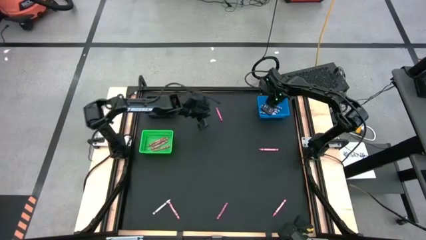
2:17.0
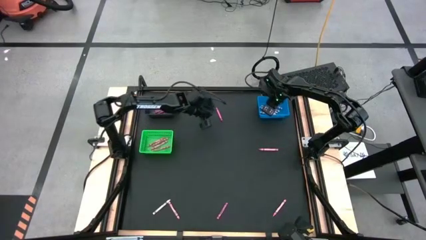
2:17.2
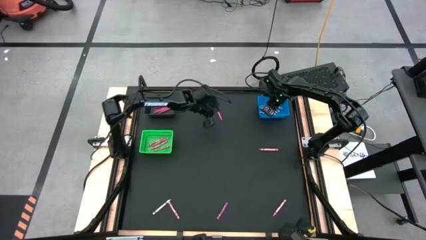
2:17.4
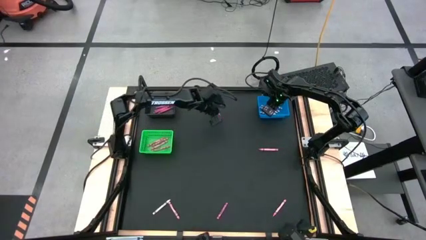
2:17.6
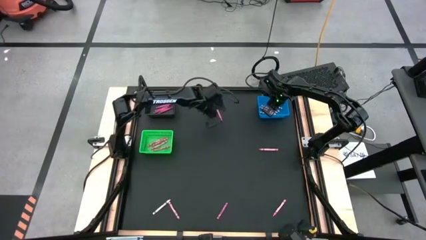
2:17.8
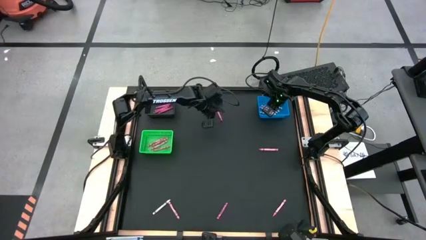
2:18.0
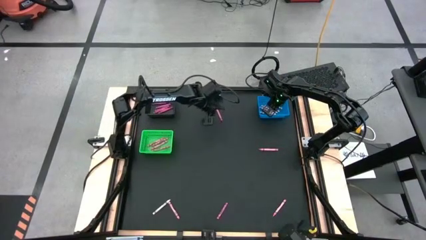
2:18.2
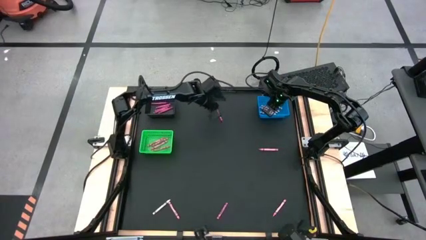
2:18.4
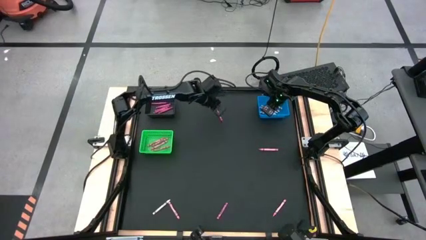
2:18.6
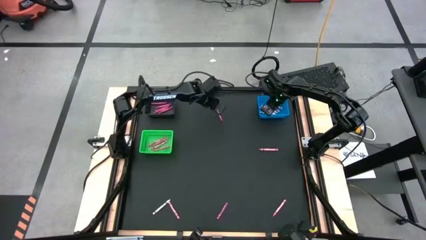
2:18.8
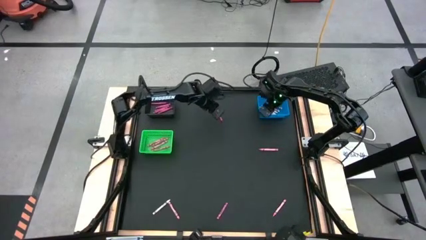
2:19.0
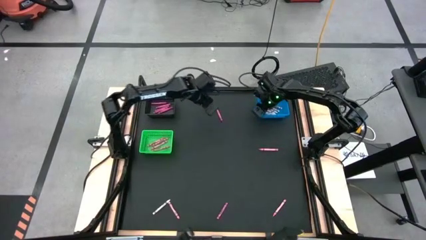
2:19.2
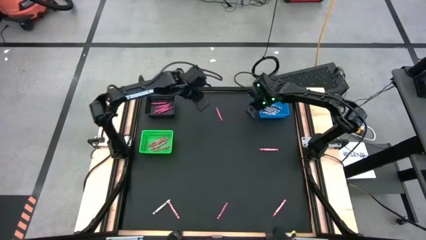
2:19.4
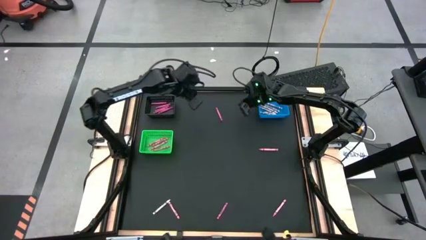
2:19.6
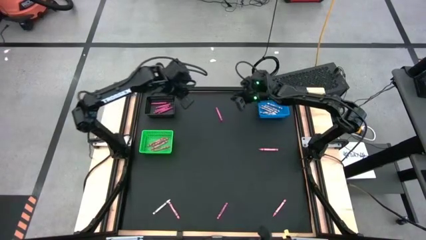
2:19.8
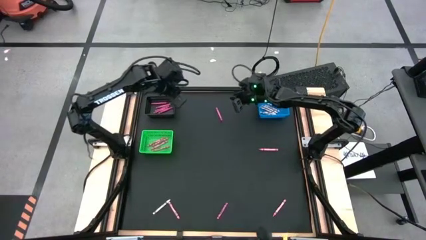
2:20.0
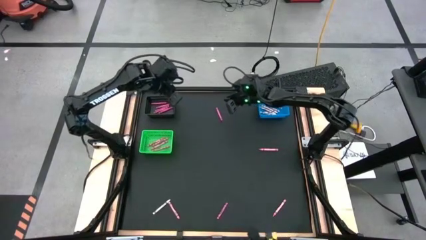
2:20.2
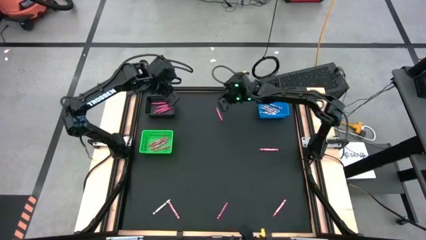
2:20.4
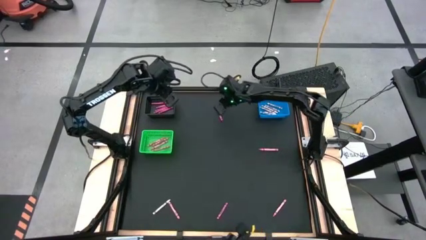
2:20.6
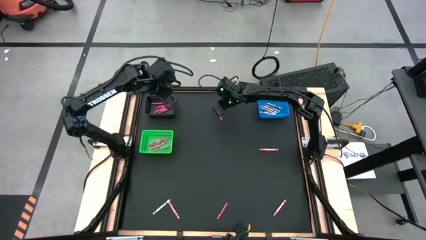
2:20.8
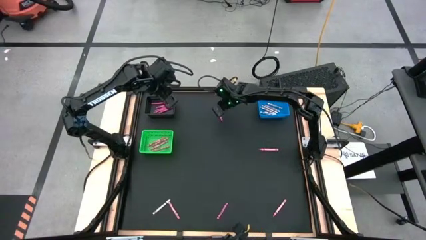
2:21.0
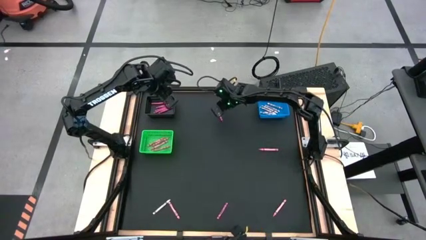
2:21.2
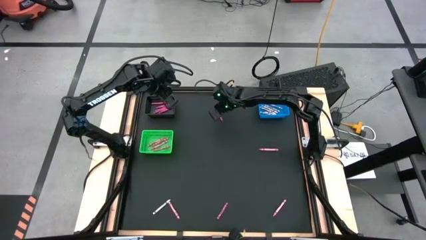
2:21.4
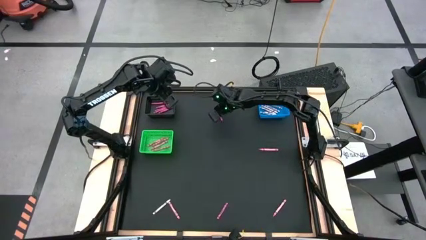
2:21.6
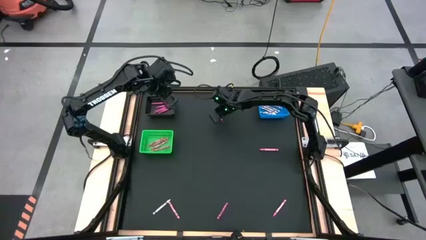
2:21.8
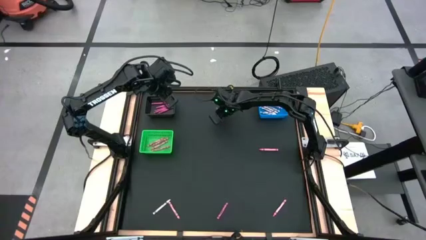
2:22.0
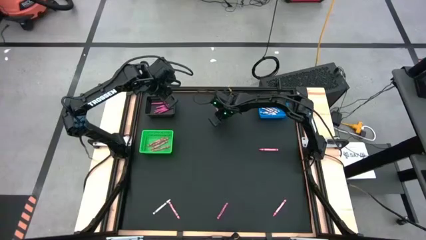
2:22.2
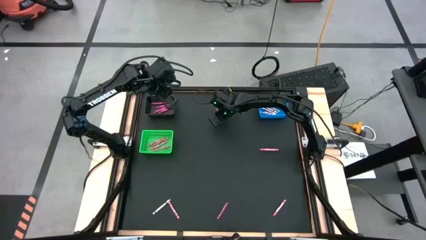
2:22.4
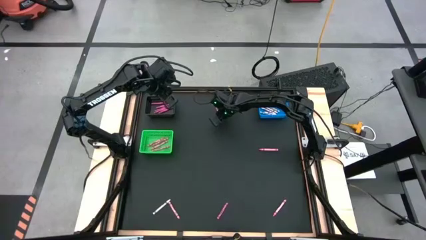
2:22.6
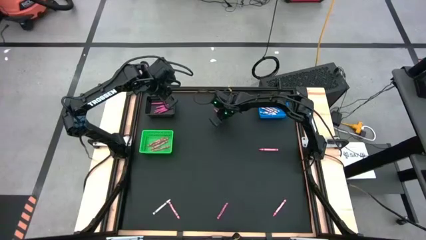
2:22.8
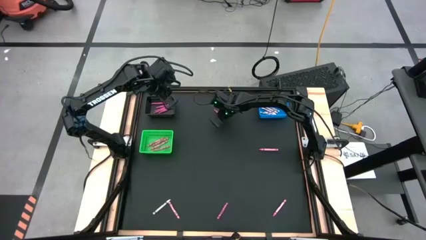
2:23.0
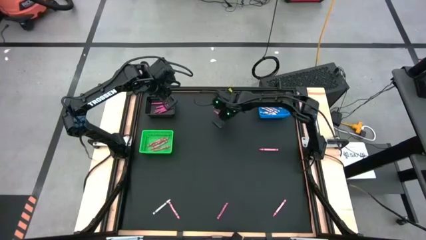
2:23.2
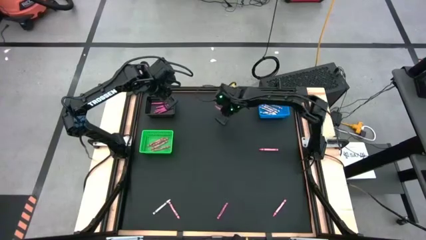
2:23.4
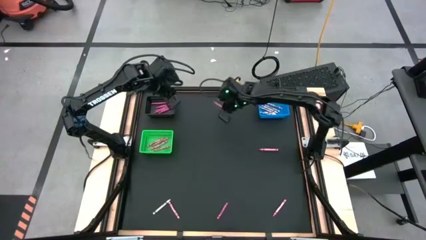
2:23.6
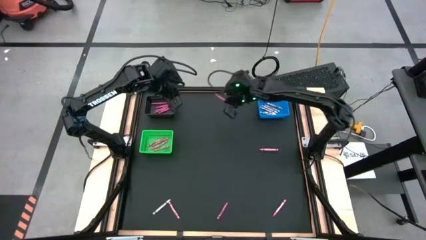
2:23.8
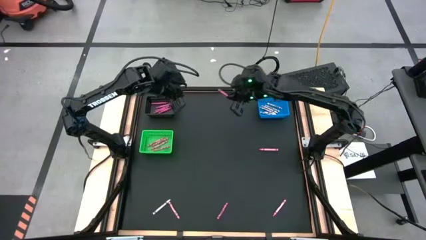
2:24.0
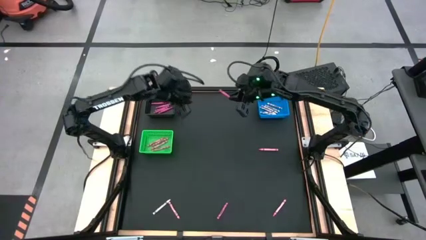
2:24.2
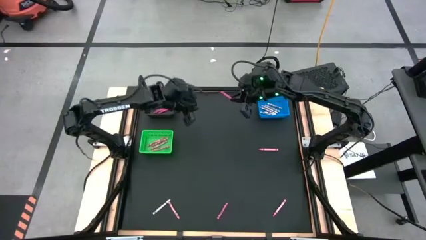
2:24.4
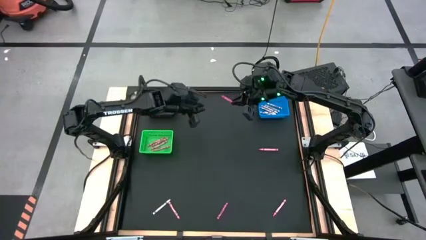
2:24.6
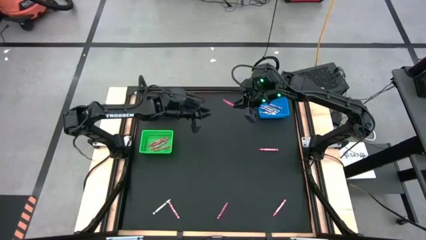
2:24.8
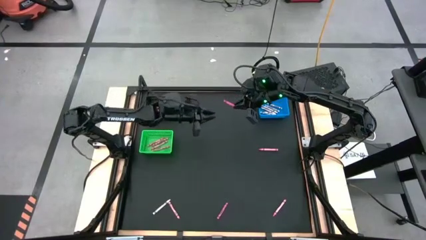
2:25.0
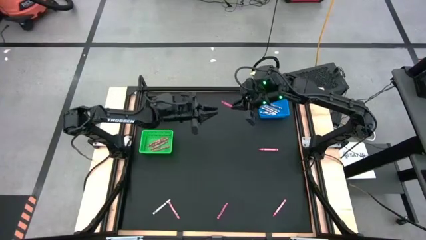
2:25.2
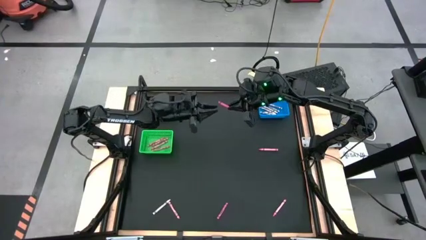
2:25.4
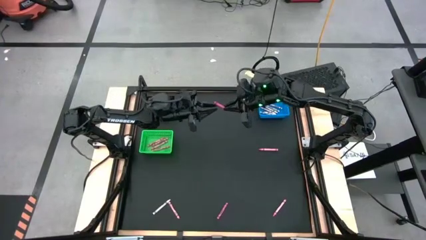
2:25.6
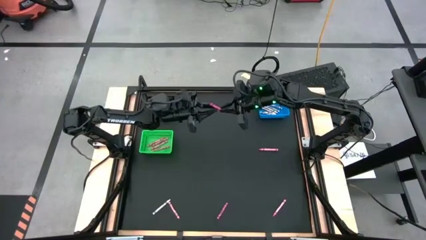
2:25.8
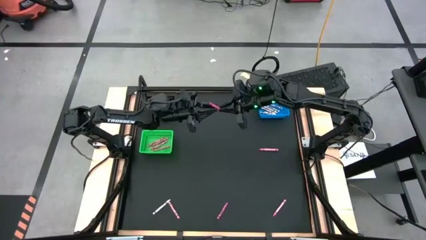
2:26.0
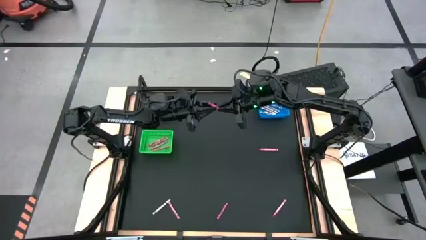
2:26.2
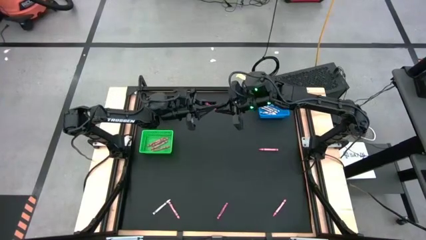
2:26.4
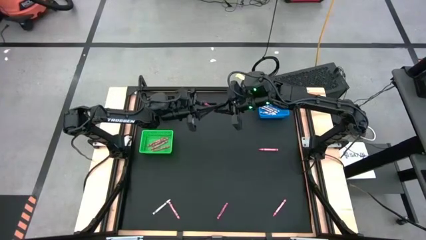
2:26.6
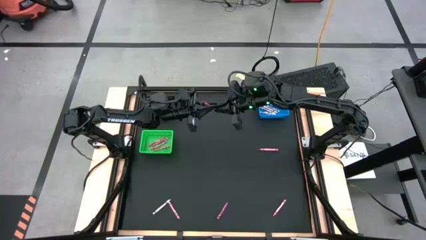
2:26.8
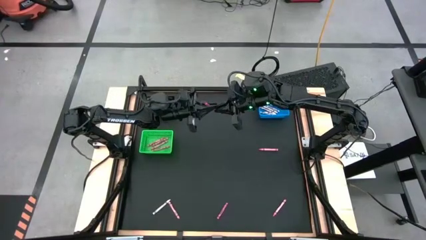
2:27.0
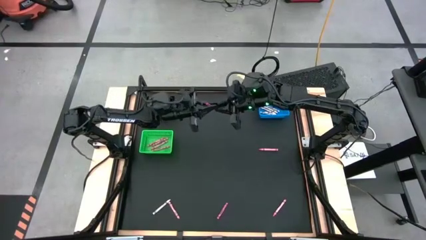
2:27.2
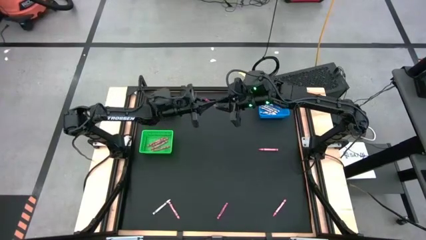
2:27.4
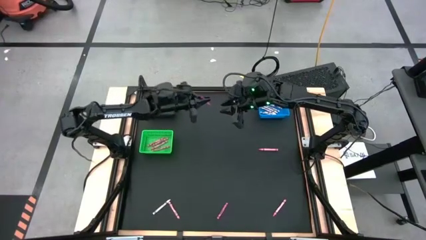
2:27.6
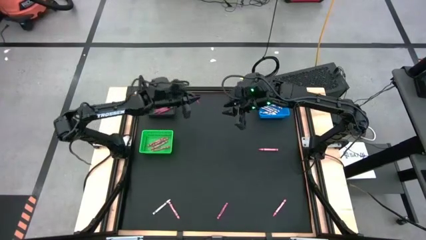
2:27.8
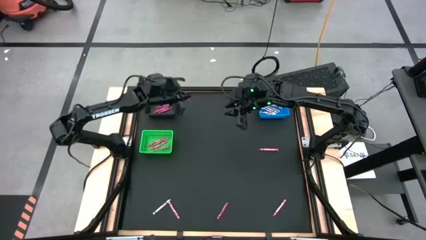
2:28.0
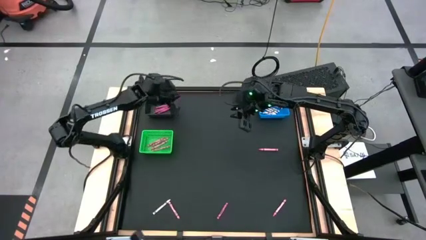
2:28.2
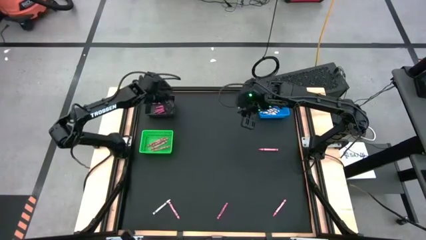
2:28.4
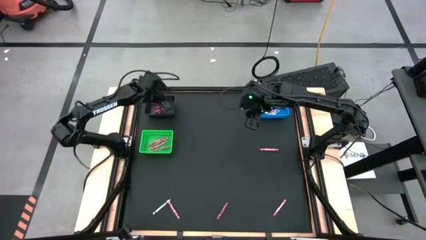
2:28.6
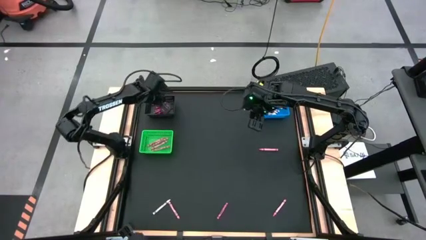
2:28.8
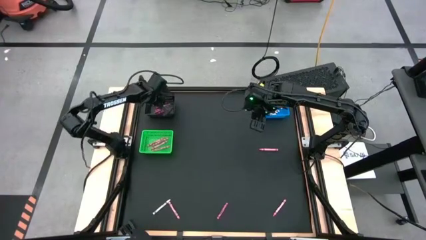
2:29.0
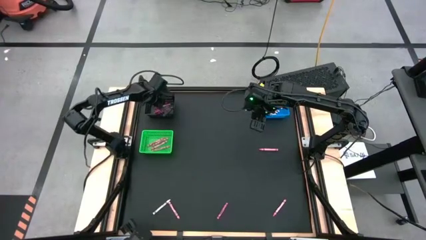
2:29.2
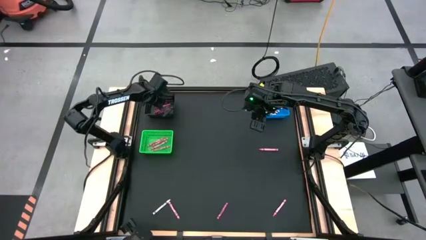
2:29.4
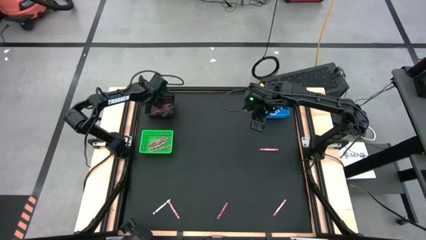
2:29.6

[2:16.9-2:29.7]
Task: Sort crayons
Put the red crayon into the black bin

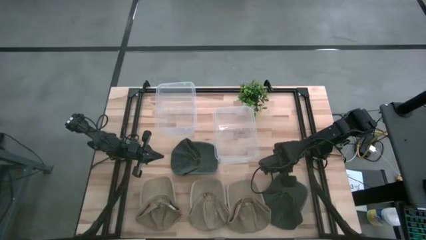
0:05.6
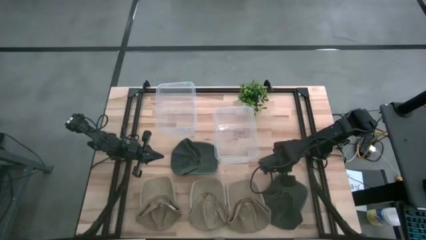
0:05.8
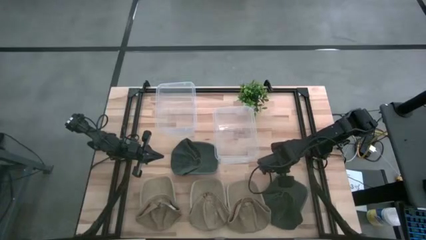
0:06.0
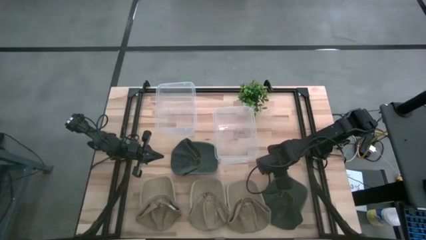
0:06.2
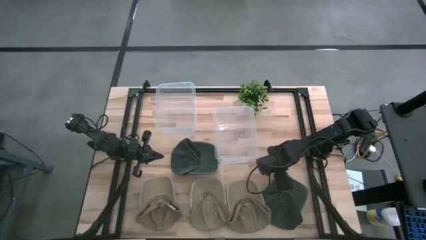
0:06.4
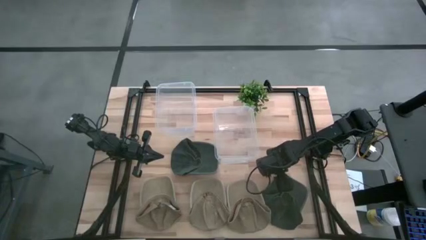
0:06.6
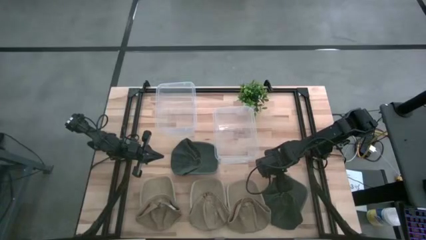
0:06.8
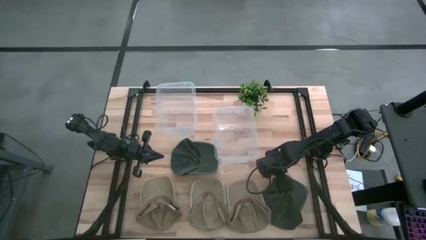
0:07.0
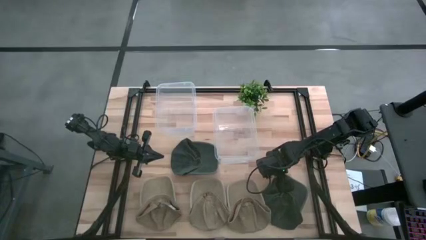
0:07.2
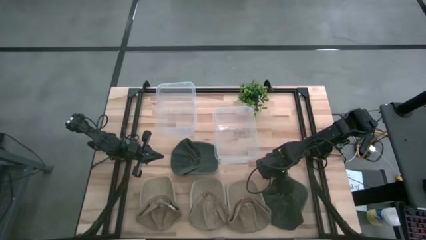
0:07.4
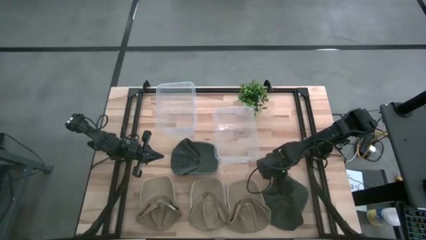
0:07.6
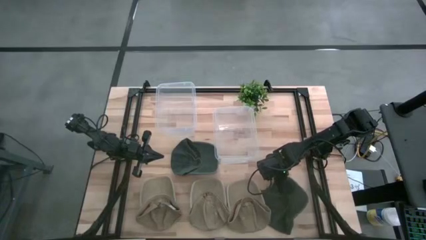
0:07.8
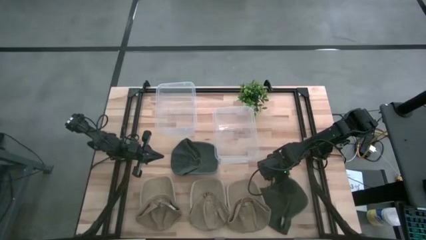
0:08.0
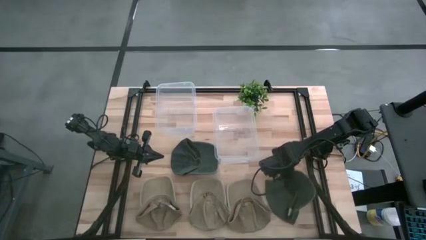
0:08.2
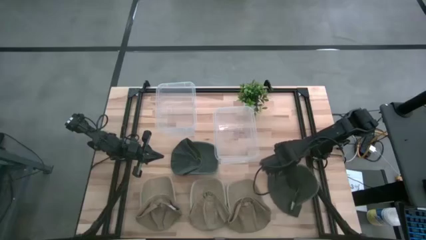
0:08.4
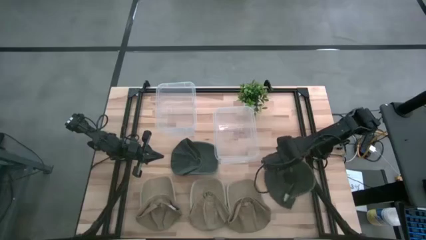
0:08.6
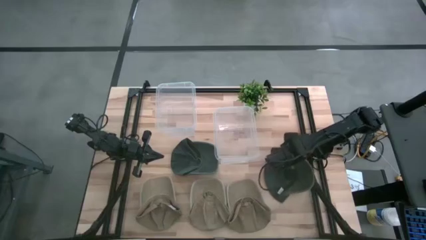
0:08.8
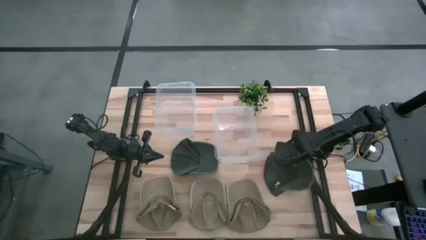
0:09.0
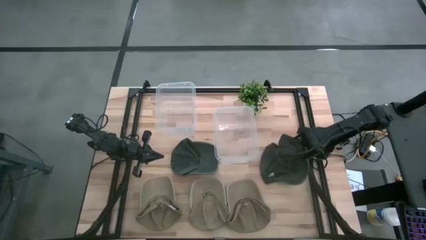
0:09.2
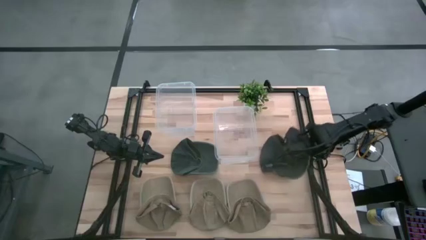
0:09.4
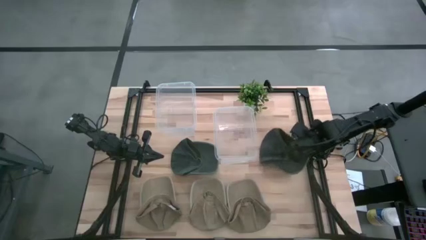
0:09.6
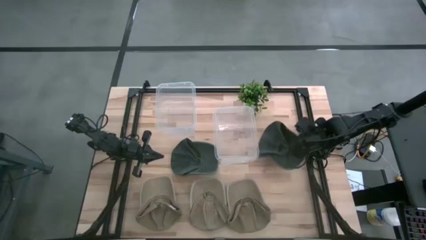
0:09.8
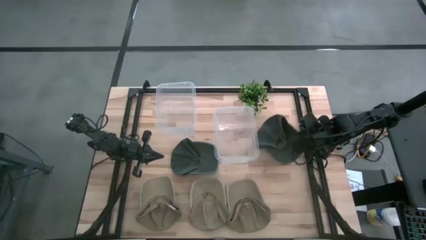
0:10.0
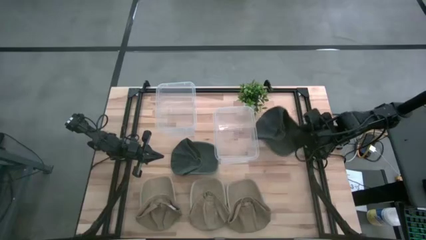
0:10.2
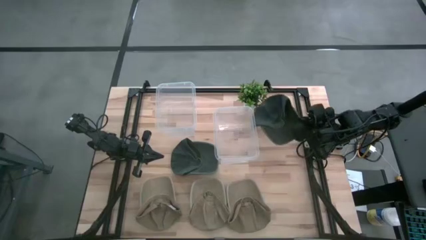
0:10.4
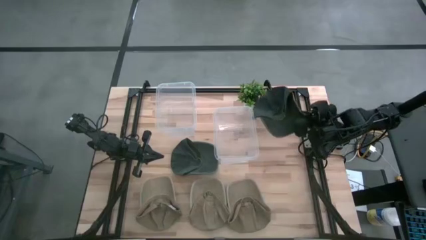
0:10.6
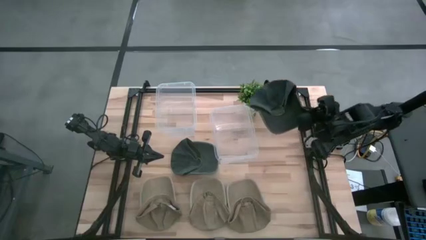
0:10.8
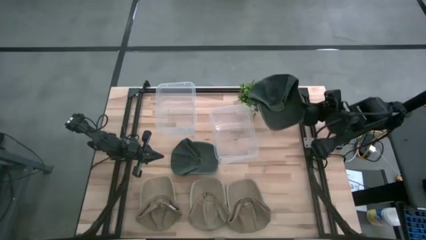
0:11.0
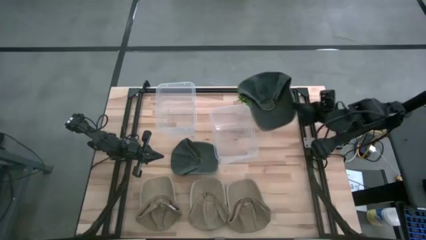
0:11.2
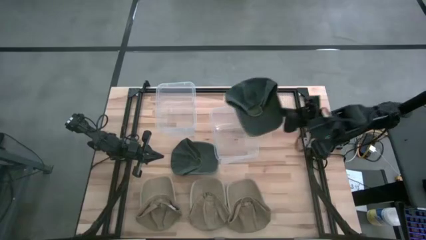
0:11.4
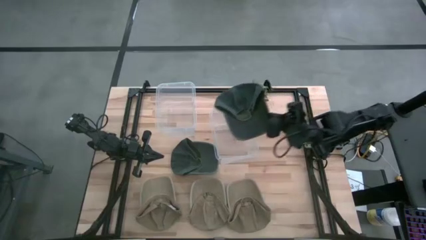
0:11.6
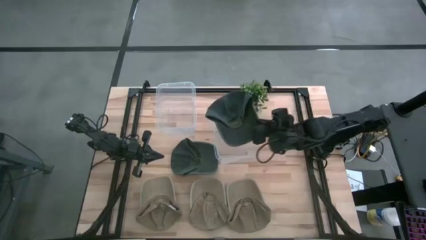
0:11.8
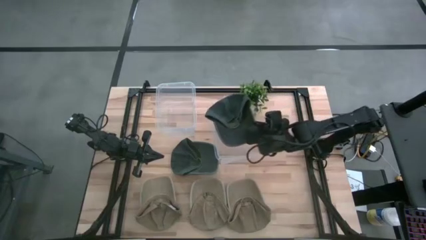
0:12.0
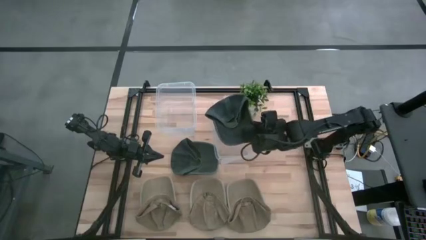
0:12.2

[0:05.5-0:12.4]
Task: Pick & Place hat
Put the bottom dark gray cap into the right transparent bin
